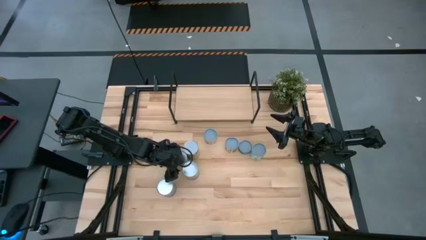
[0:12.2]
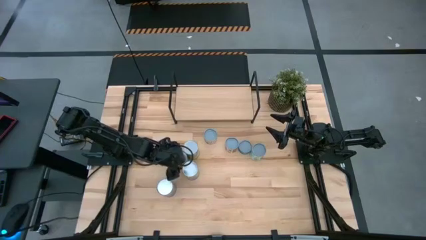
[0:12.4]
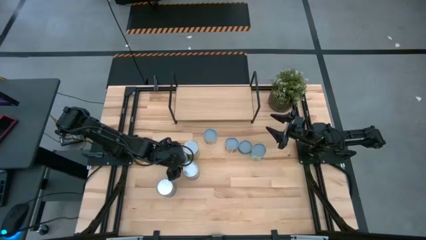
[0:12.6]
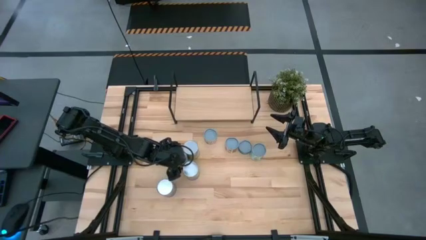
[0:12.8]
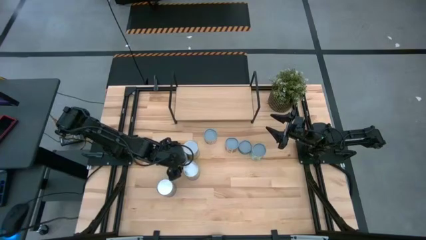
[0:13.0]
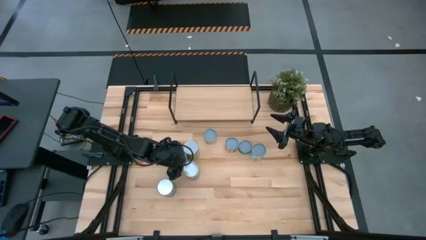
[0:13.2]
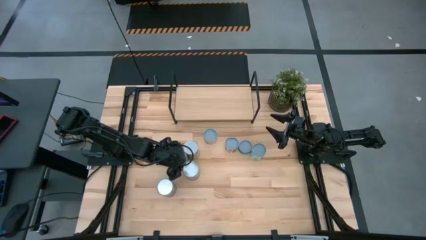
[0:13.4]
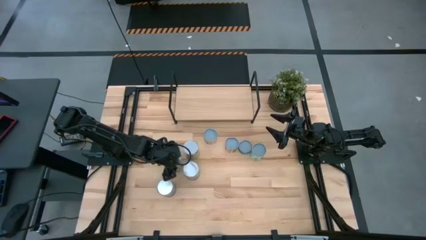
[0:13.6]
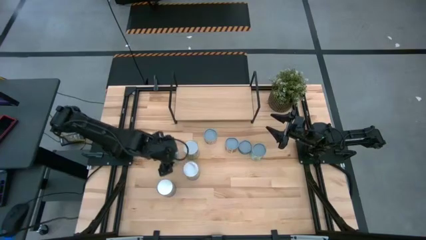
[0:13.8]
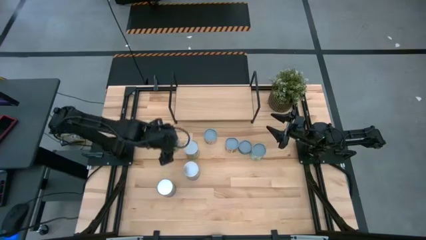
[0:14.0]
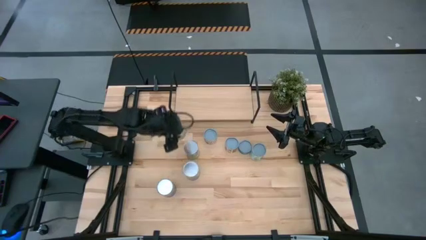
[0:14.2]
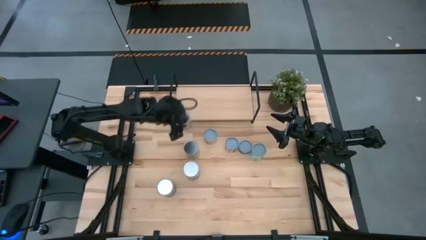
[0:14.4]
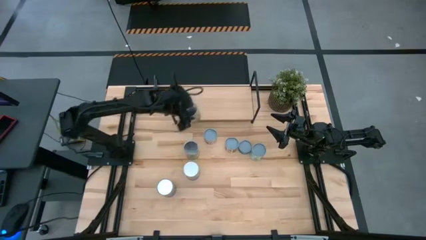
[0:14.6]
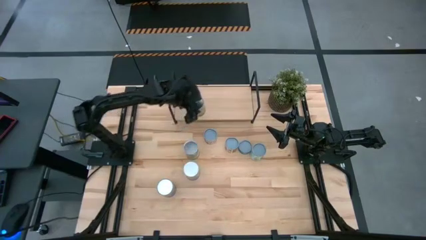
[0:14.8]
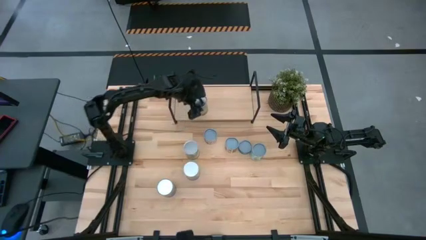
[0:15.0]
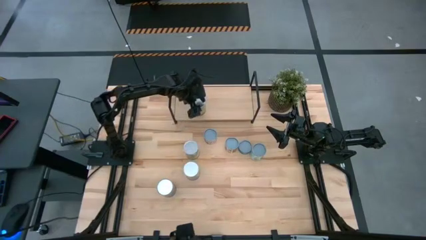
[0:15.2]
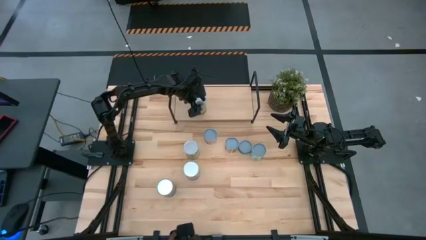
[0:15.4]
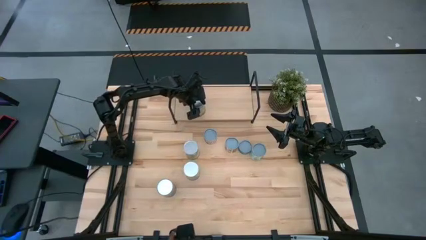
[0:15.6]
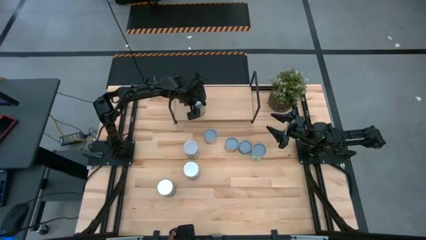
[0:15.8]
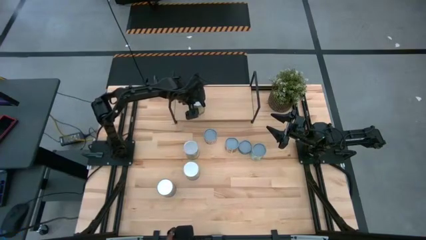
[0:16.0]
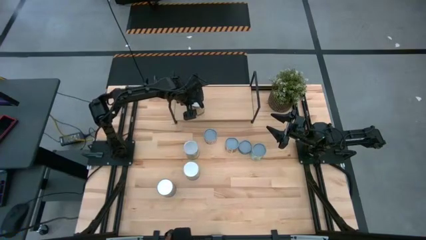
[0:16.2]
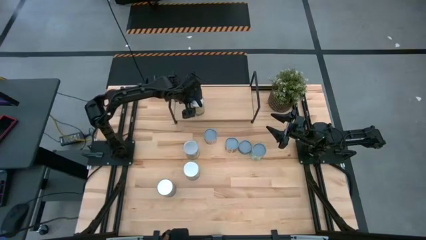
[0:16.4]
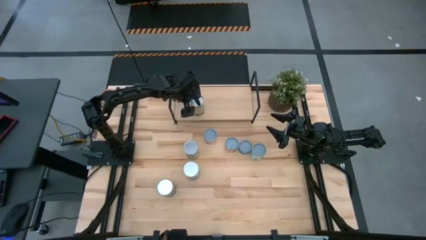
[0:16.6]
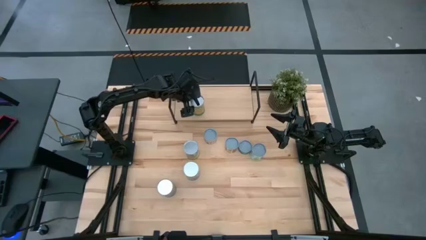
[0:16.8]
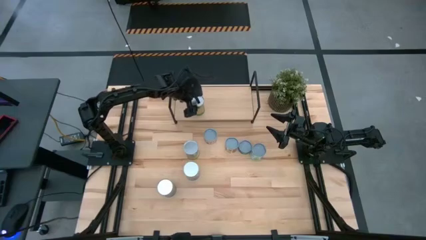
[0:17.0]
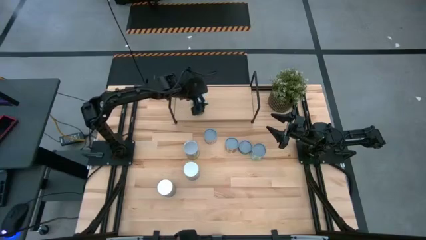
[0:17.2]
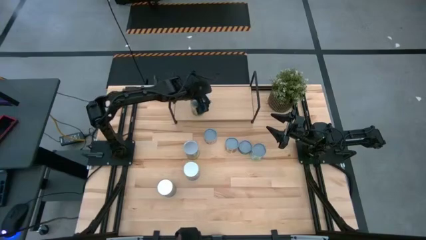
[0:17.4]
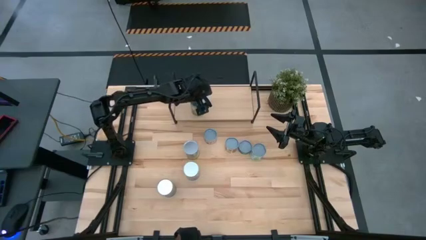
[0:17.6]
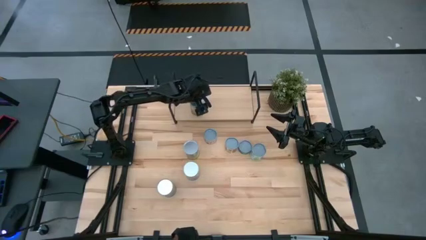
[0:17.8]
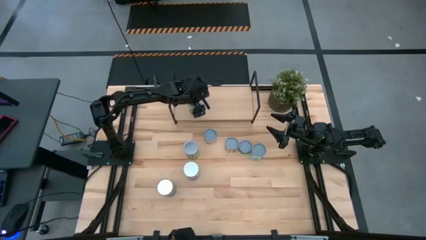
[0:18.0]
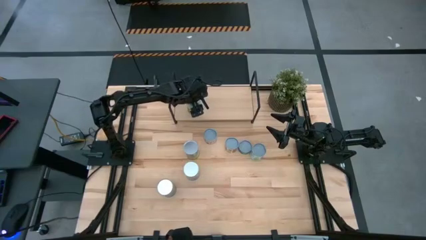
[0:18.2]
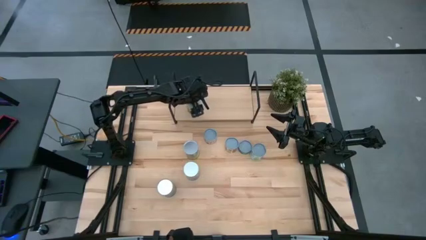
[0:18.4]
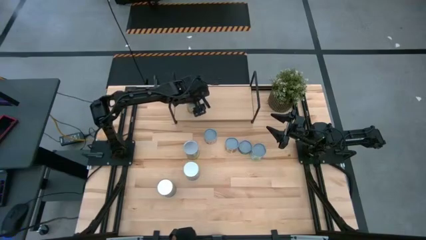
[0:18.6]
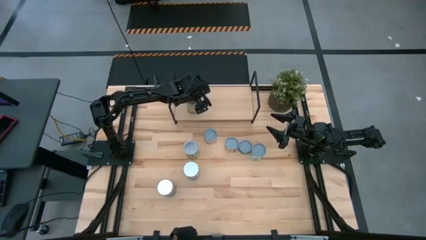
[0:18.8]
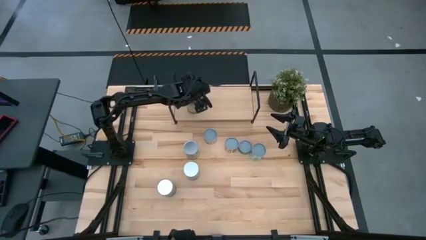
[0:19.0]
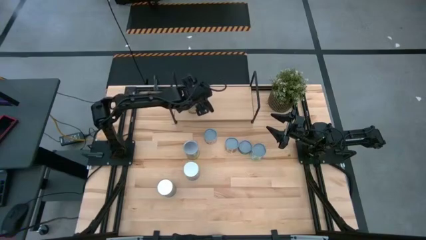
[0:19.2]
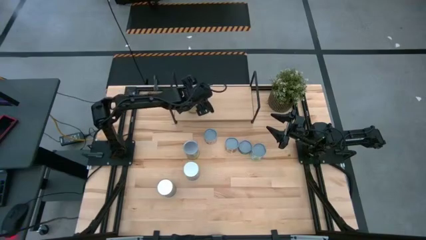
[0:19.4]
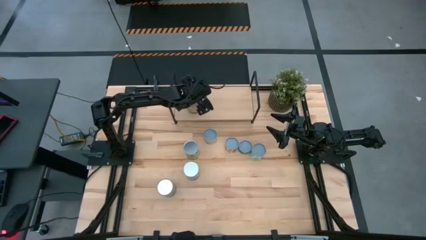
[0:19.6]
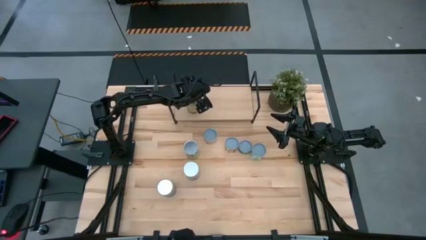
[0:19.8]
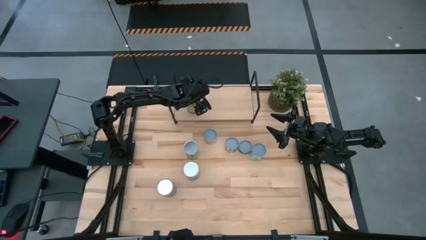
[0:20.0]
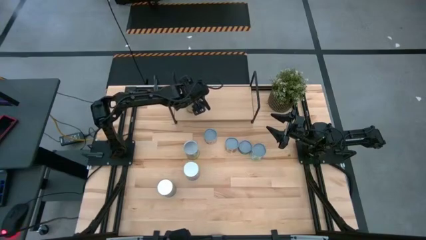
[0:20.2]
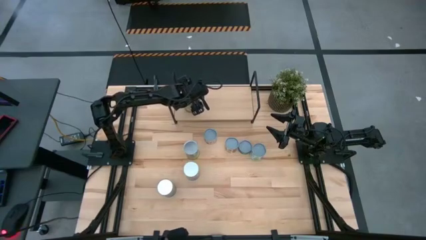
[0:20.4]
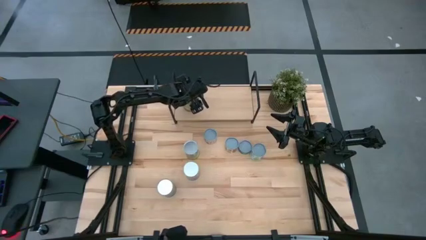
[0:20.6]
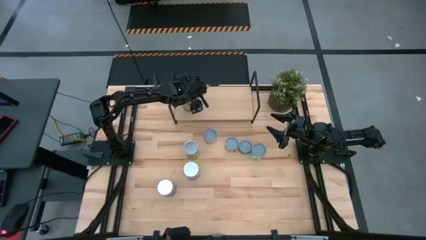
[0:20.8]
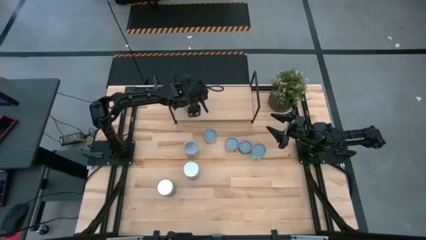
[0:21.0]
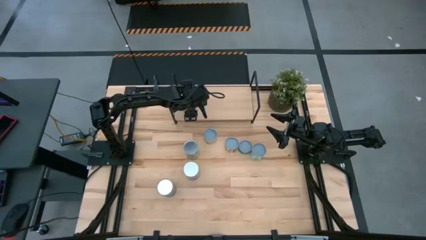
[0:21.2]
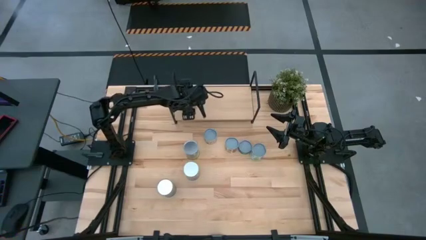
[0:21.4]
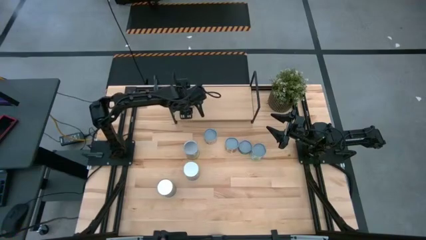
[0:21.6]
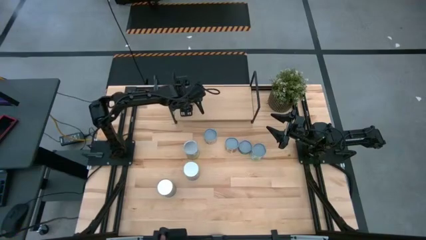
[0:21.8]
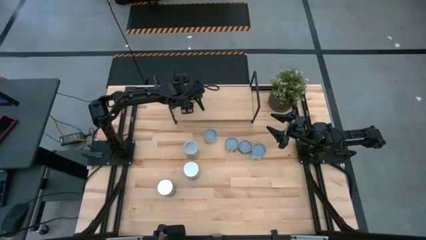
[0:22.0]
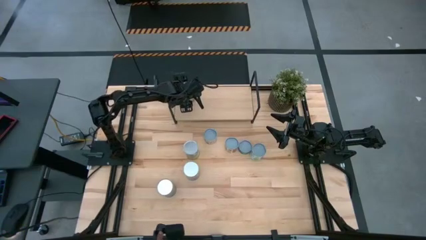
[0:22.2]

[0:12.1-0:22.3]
Task: Pick and place cans onto a shelf
Put the canned oranges on the shelf

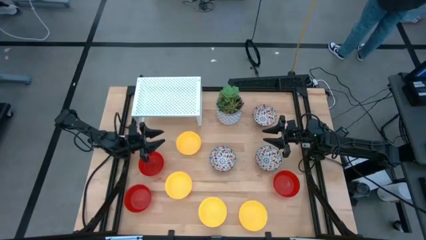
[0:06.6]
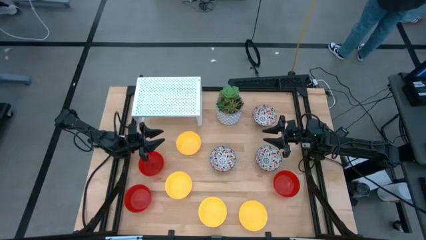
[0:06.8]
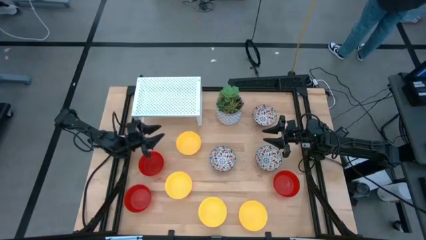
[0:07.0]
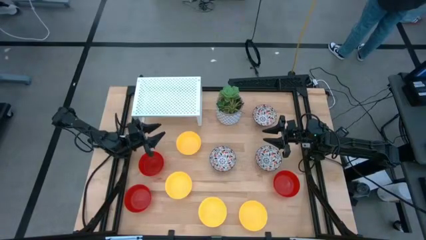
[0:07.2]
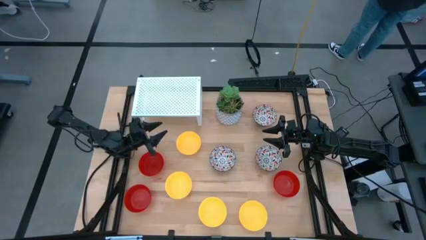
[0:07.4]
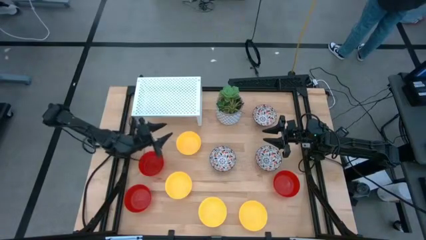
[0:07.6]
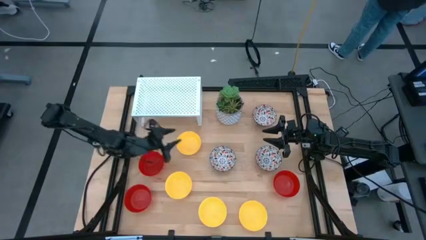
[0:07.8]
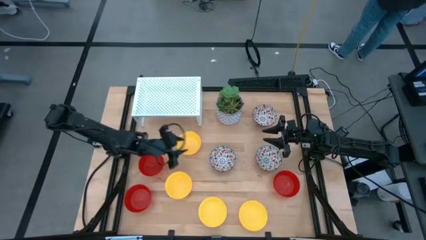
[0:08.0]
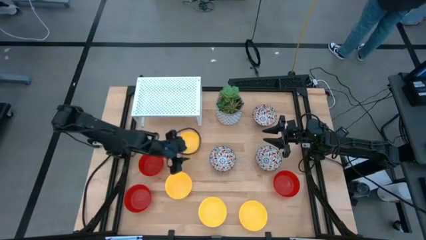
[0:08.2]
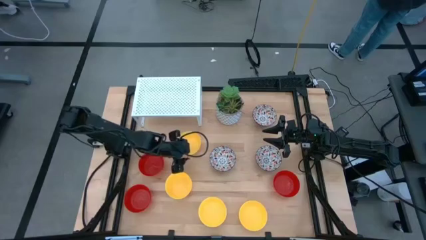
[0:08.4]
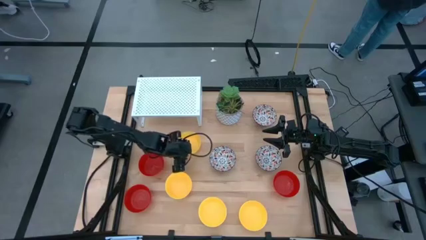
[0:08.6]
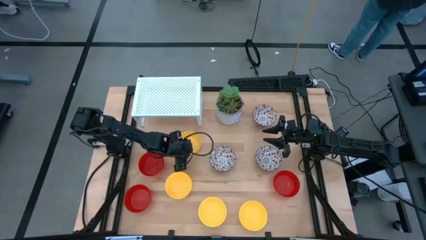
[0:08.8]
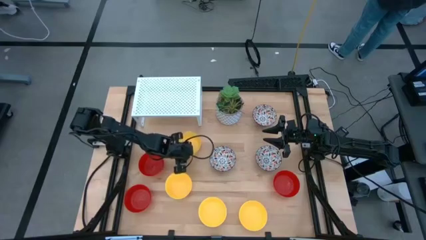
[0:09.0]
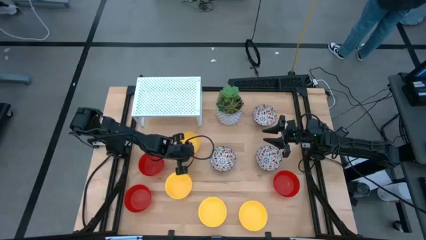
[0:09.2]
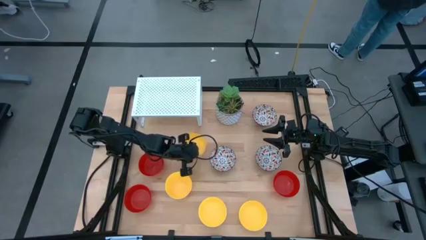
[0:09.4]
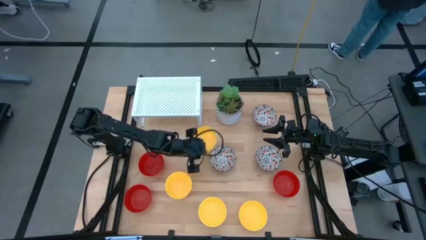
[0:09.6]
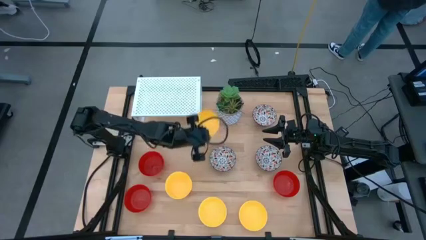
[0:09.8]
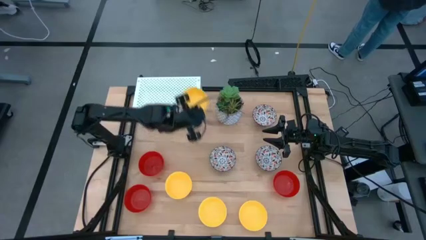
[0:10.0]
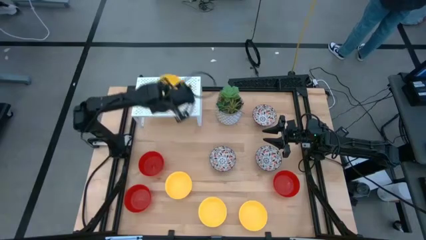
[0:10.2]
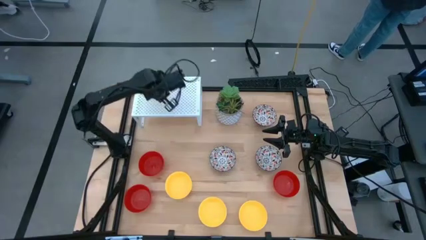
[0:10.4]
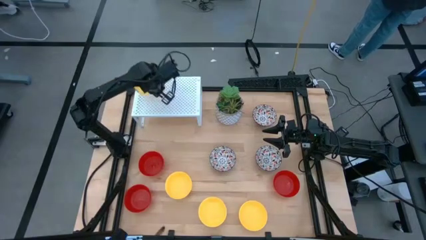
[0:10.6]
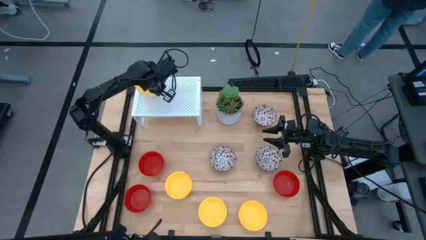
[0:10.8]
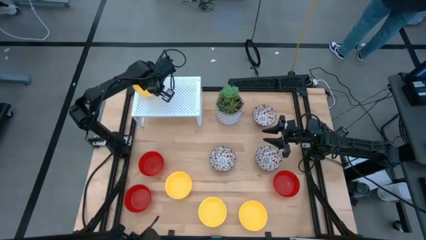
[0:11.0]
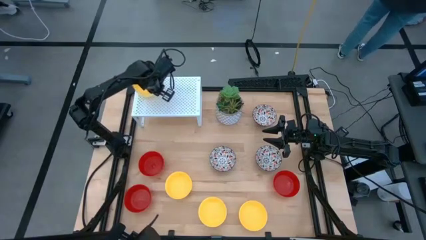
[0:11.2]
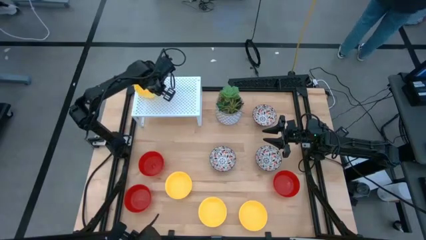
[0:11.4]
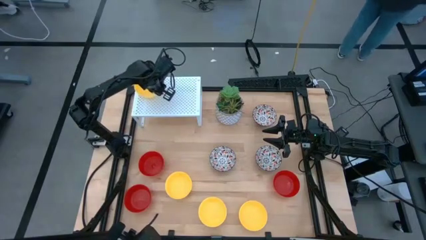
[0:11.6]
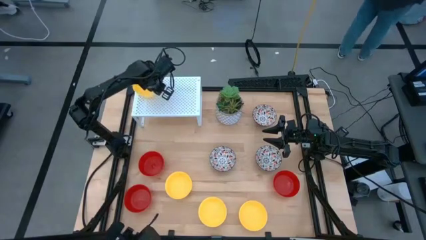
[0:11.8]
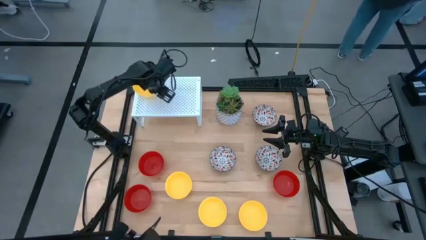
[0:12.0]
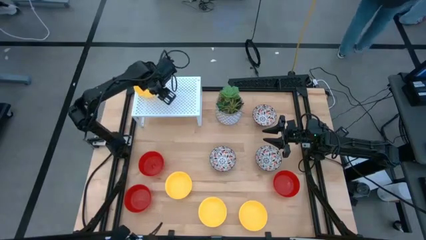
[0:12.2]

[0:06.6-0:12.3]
Task: Pick & Place Mini bowls
Put the yellow bowl on the shelf
